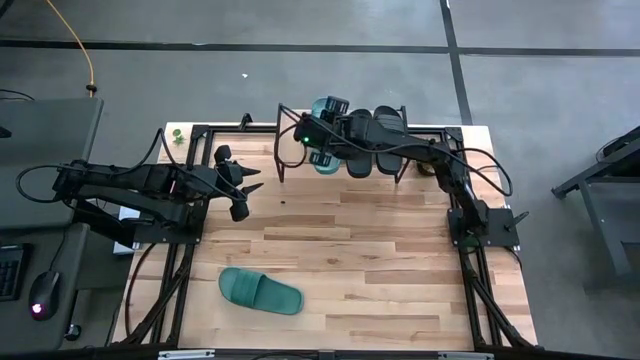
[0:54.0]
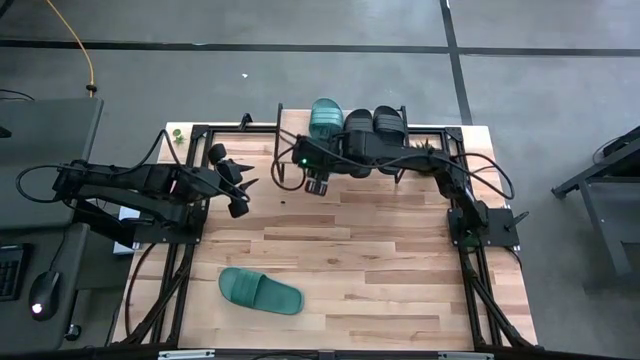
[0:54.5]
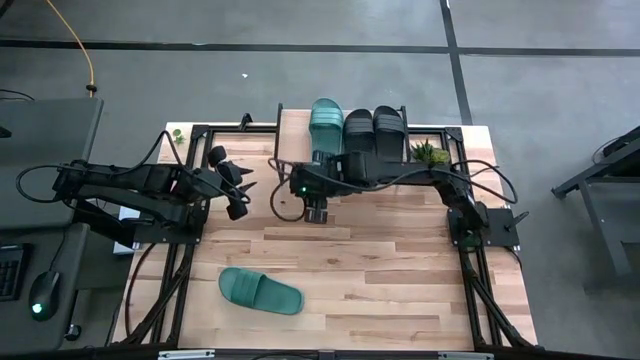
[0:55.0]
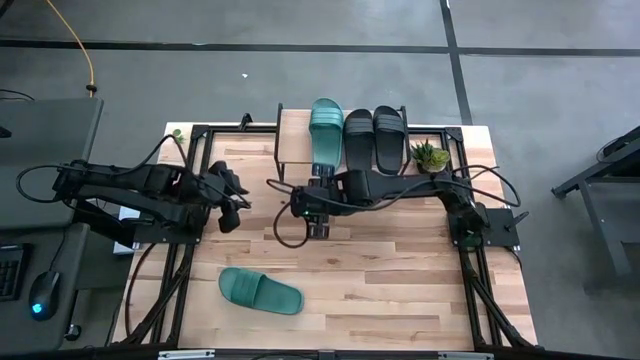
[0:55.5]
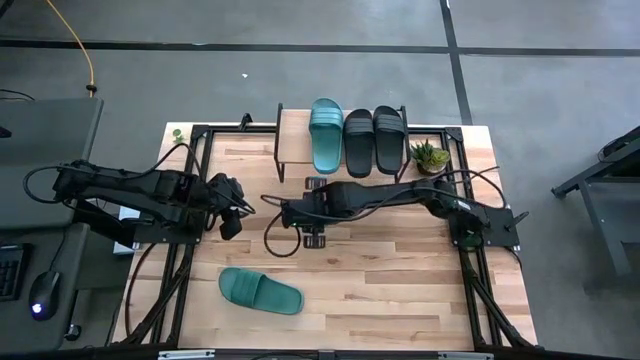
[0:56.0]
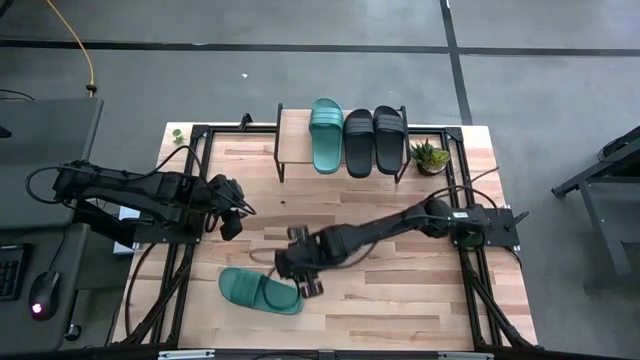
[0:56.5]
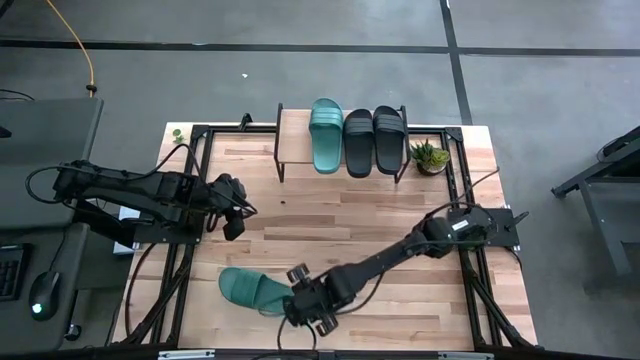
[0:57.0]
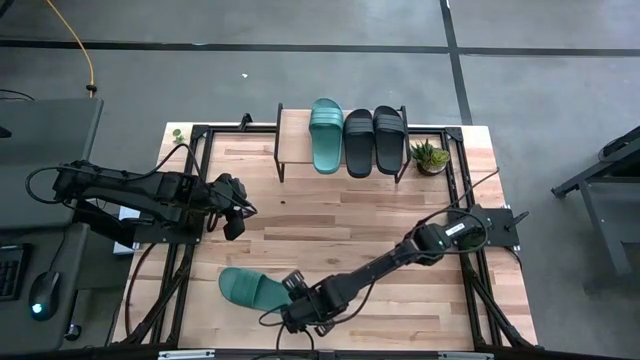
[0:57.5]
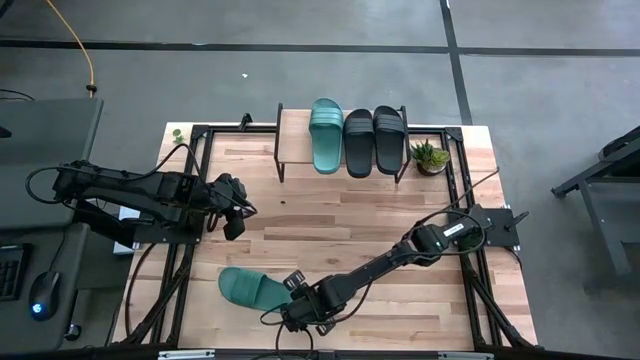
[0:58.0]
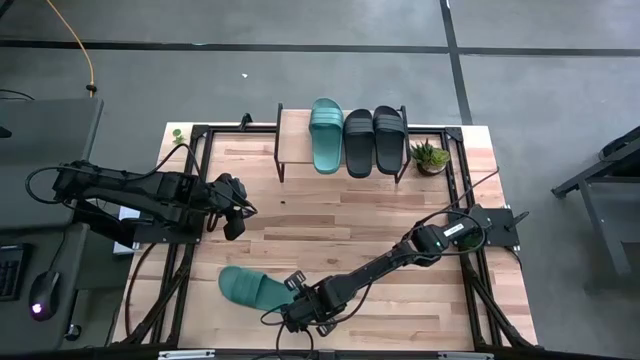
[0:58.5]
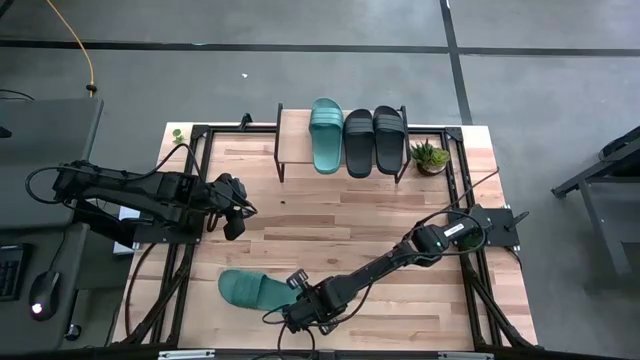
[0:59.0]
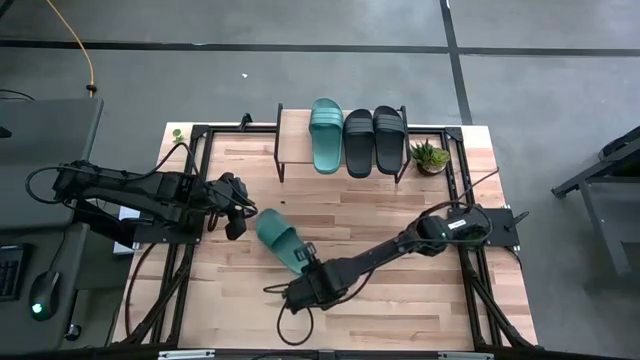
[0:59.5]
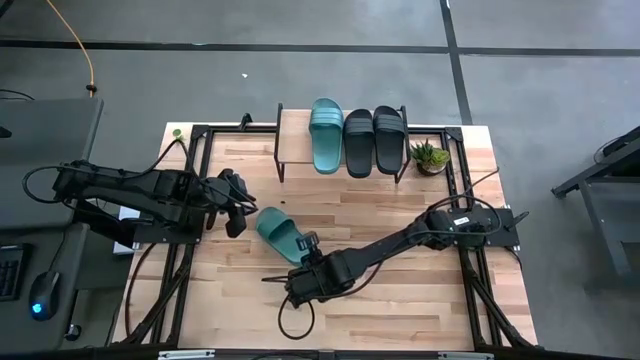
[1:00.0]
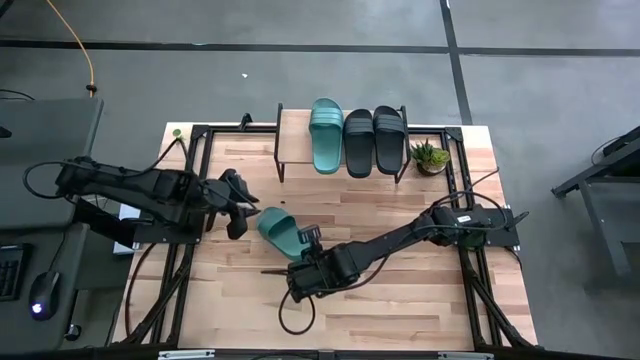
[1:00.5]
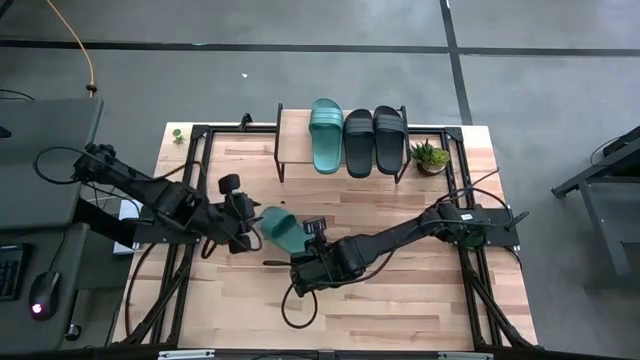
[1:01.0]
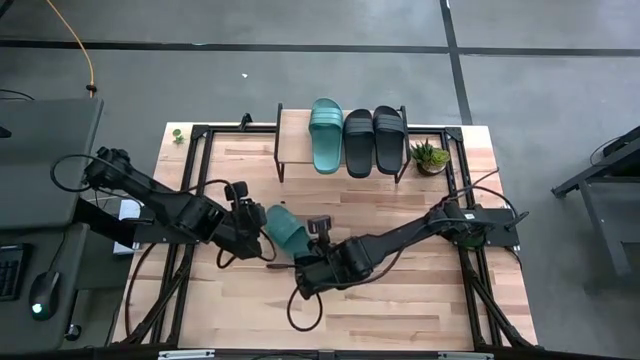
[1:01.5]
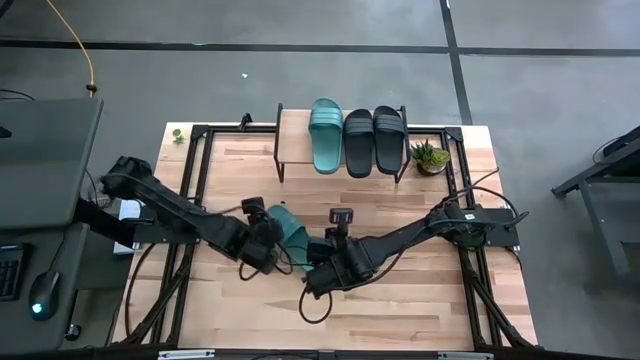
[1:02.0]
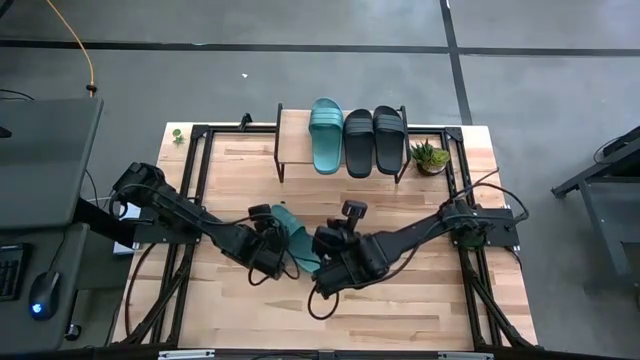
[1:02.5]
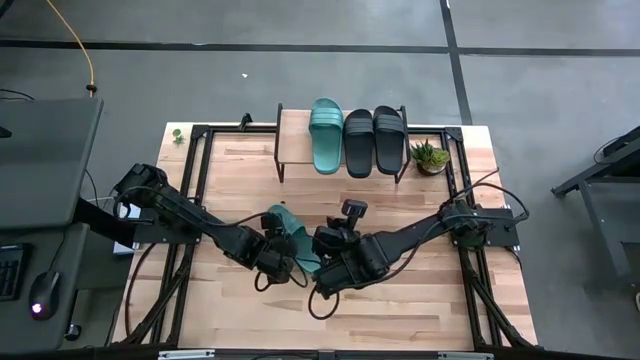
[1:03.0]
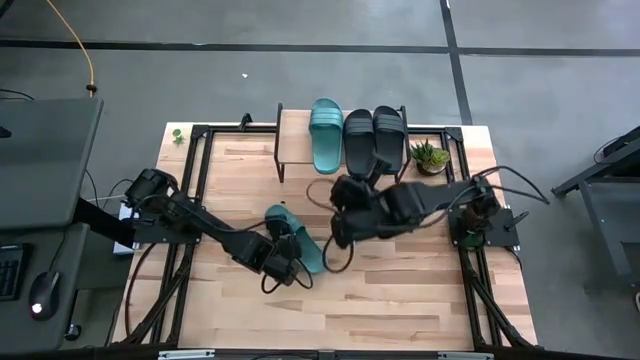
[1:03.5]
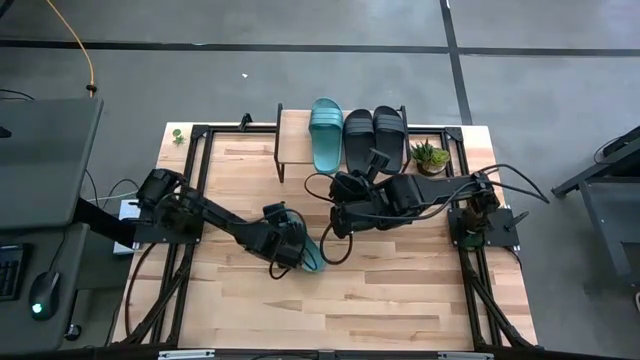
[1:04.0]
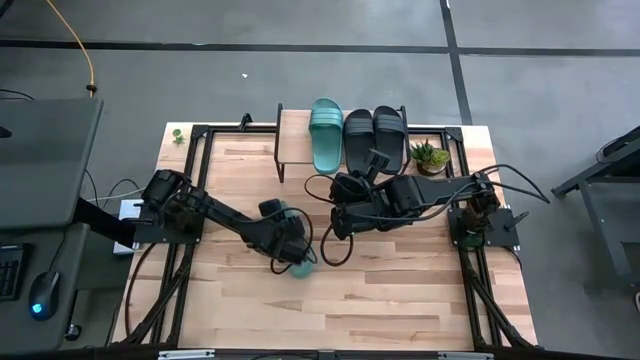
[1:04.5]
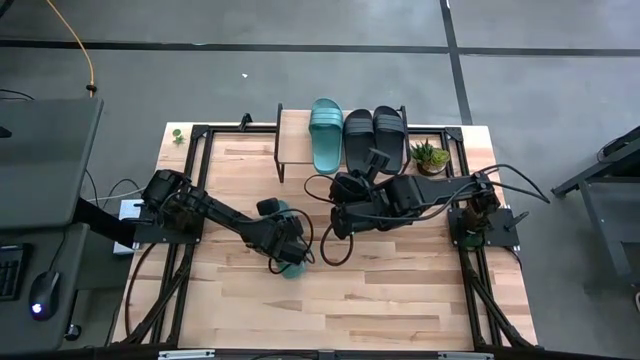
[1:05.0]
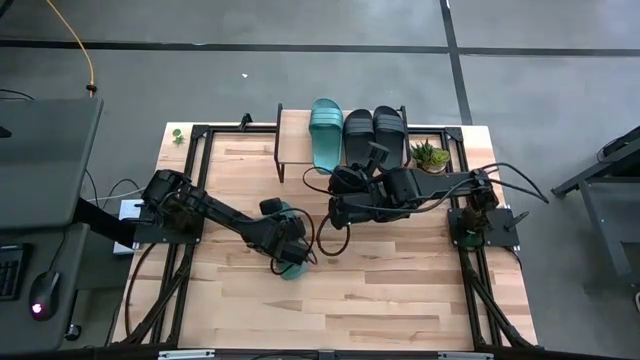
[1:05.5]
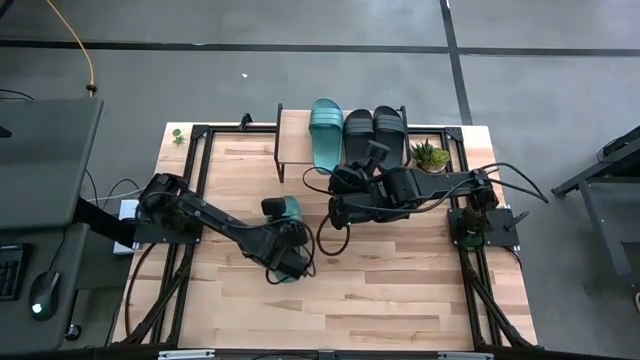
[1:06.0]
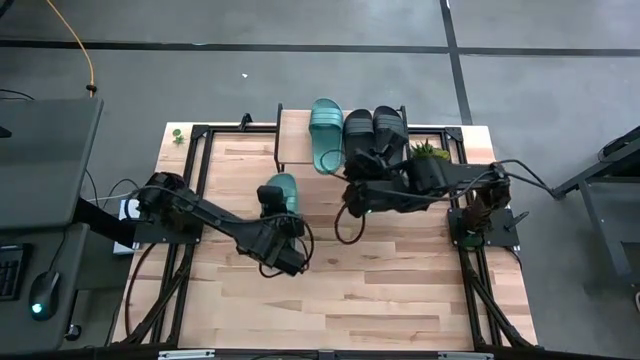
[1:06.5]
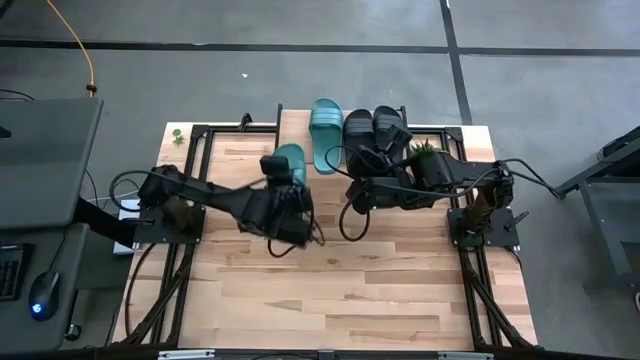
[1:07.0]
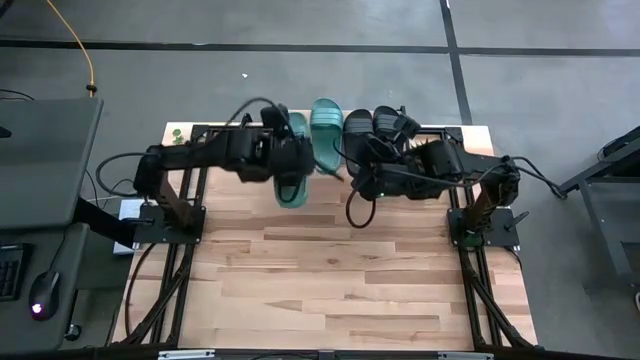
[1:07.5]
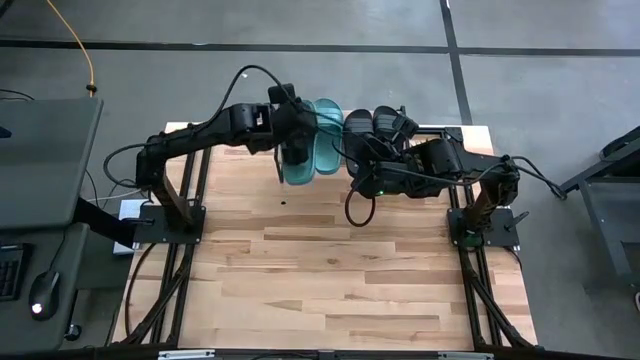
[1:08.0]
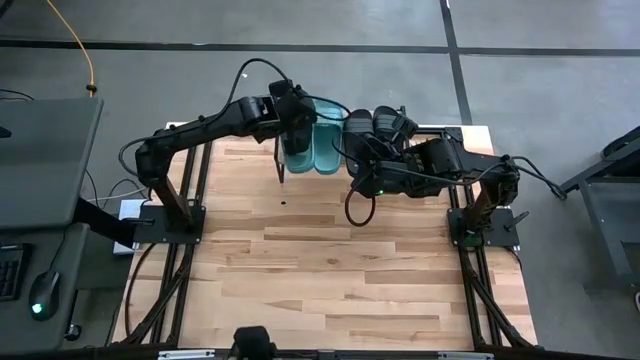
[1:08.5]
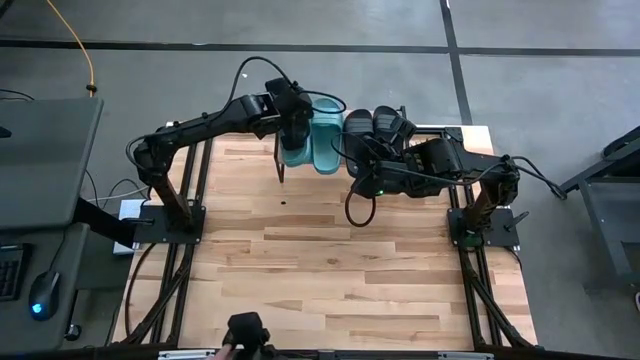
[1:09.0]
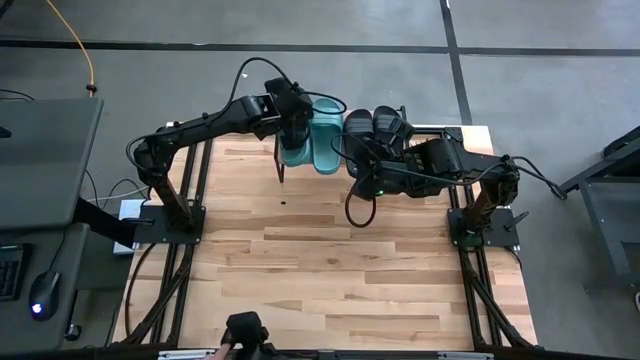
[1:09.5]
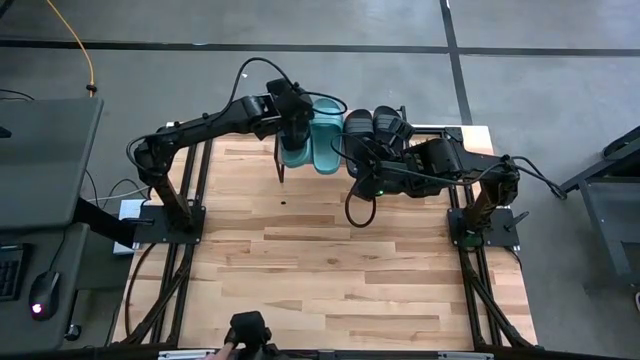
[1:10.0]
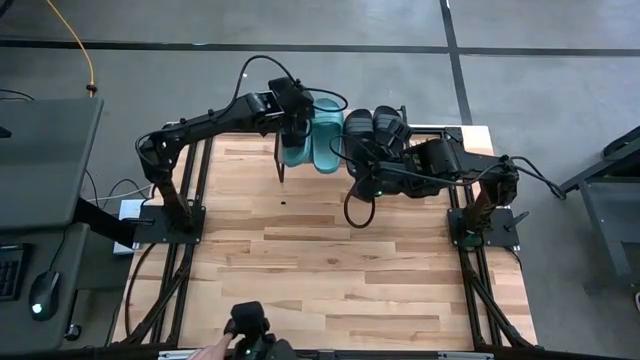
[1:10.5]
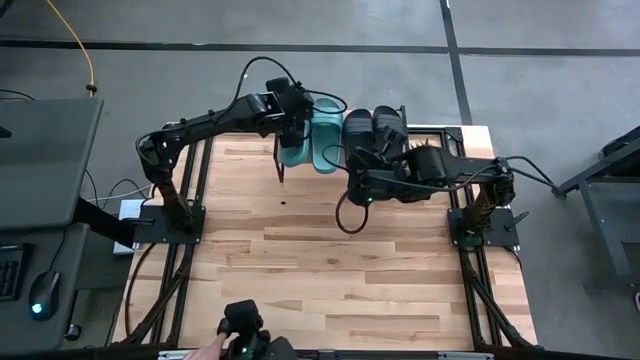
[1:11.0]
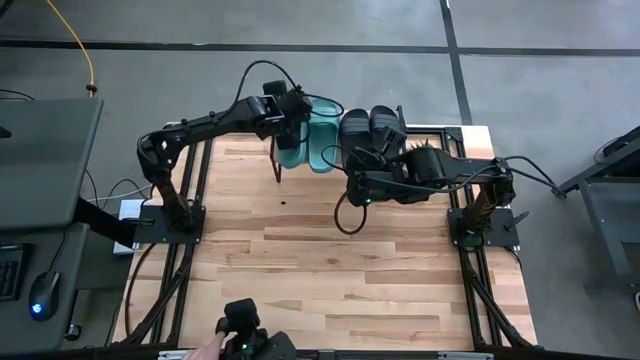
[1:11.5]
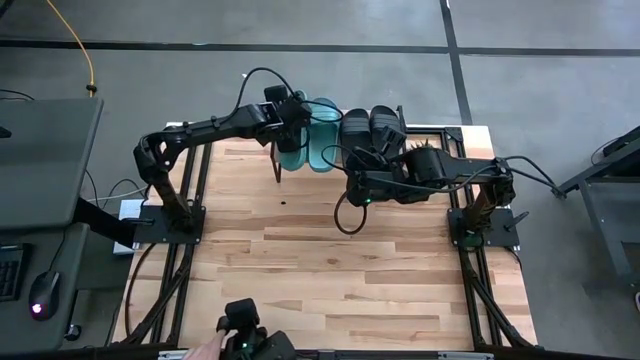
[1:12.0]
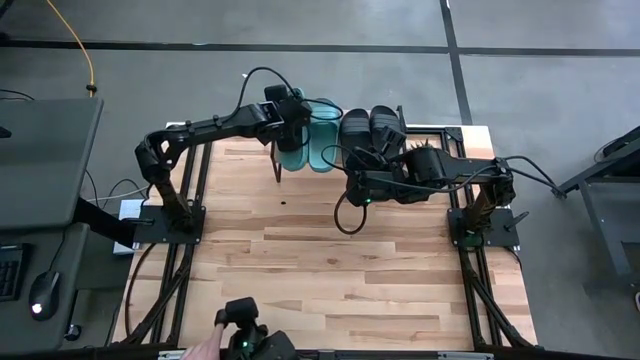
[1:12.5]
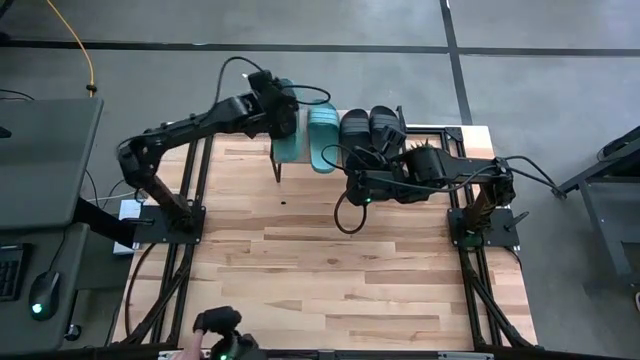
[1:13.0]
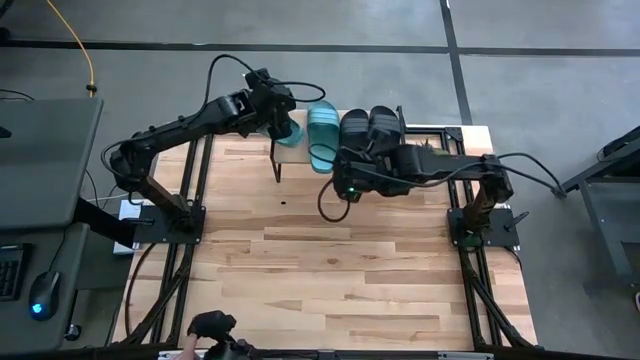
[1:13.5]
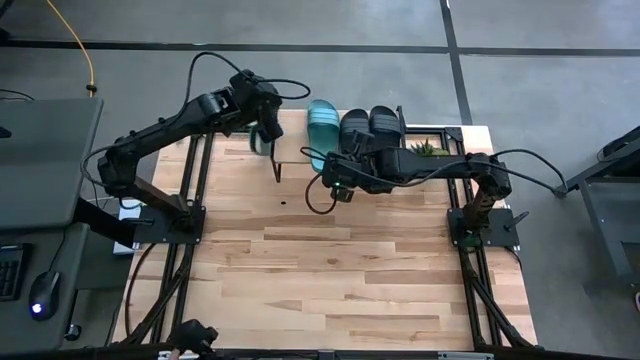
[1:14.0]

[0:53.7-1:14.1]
Task: Pick and place slides into the shelf
Put the green slide on the shelf

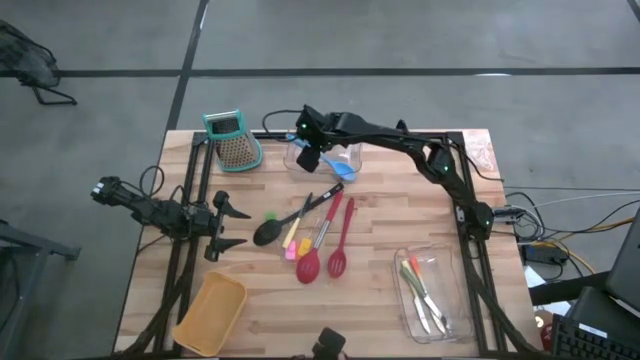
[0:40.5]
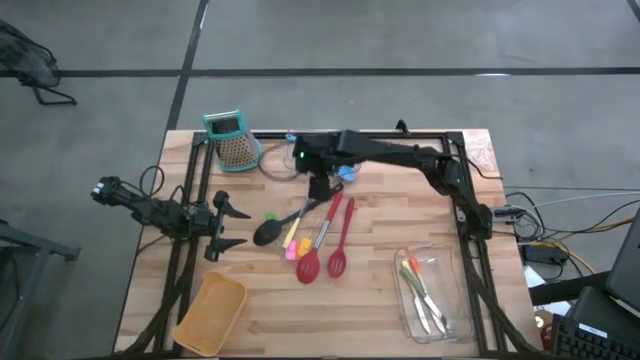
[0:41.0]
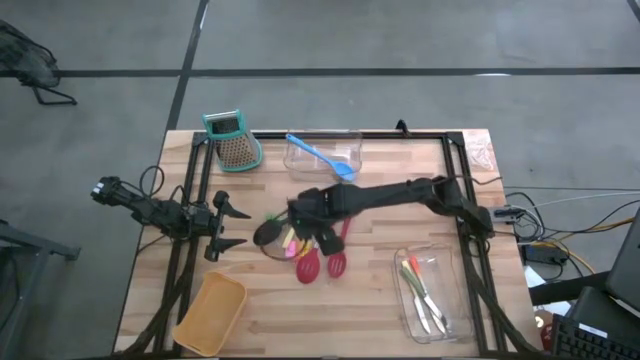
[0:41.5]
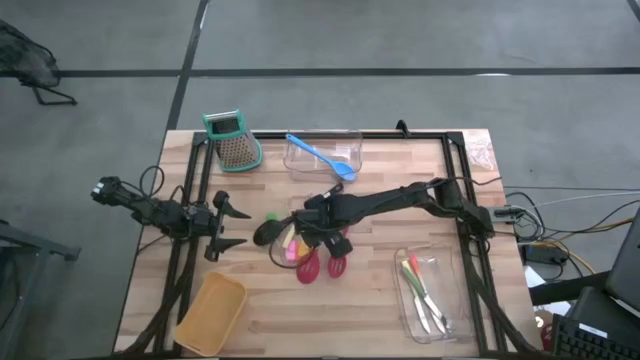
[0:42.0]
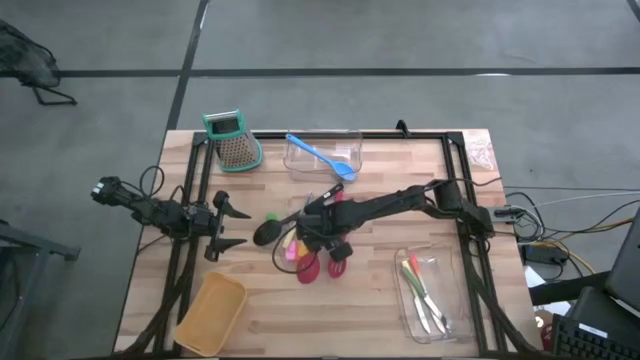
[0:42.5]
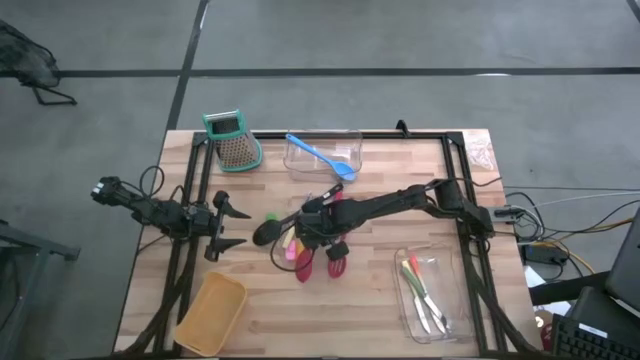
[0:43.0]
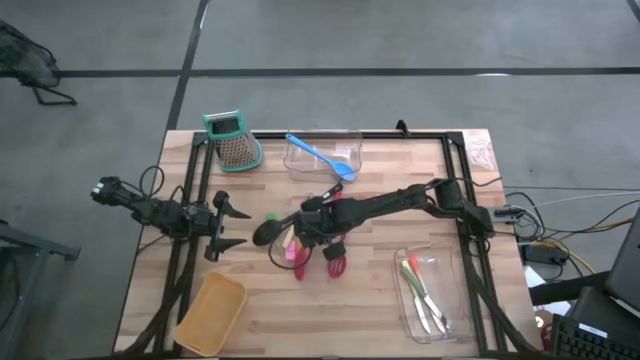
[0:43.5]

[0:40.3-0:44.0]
Task: Pick & Place Kitchen Items
Put the red slotted spoon into the top transparent bin
